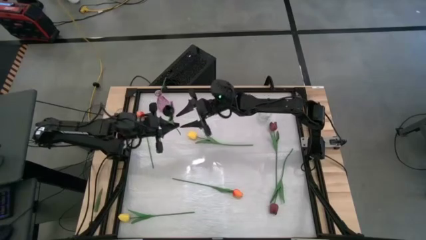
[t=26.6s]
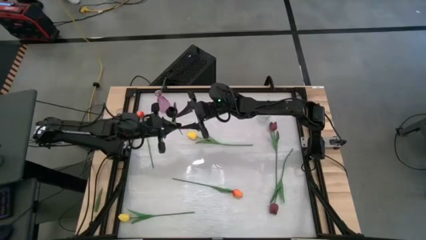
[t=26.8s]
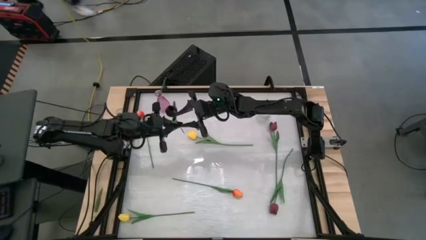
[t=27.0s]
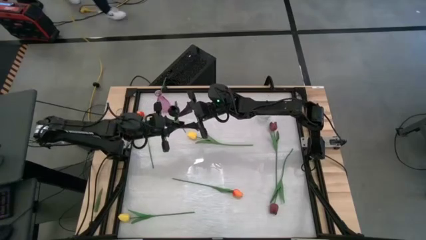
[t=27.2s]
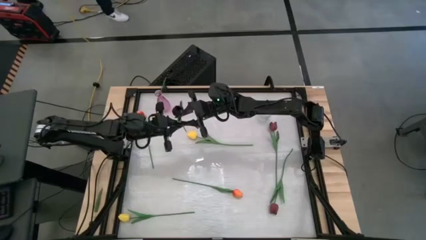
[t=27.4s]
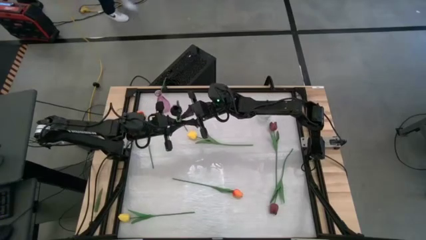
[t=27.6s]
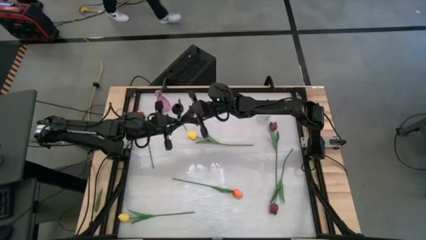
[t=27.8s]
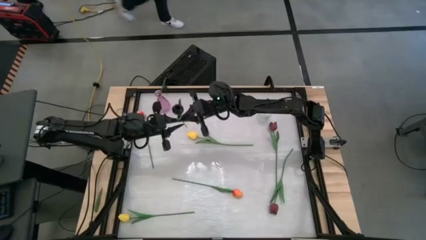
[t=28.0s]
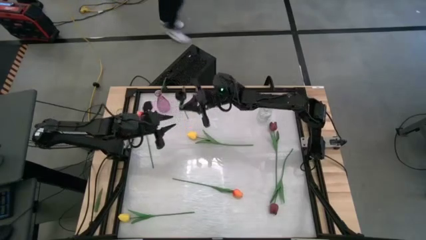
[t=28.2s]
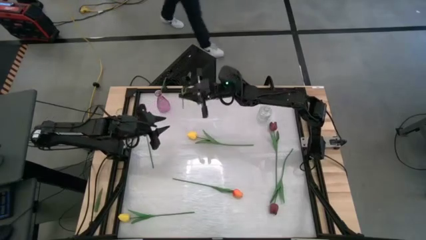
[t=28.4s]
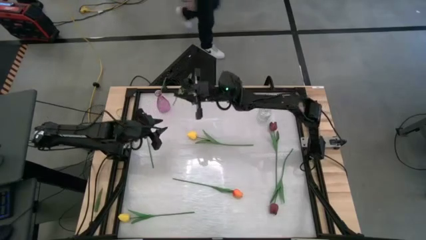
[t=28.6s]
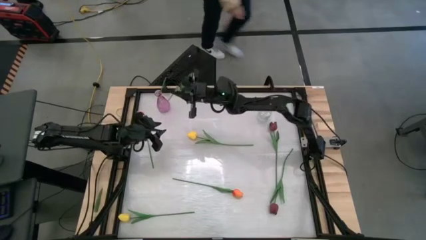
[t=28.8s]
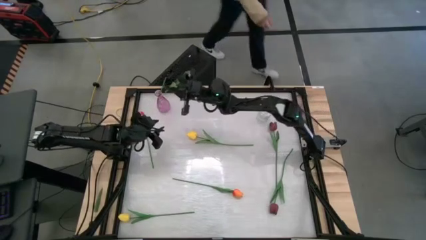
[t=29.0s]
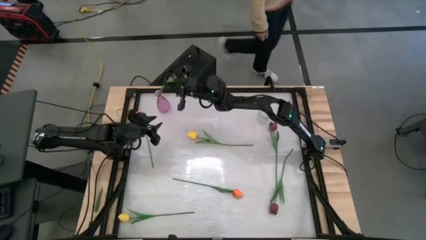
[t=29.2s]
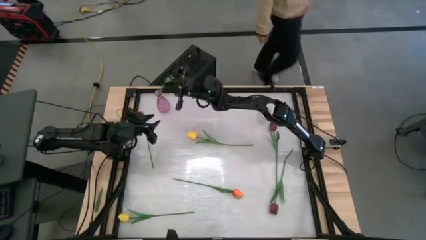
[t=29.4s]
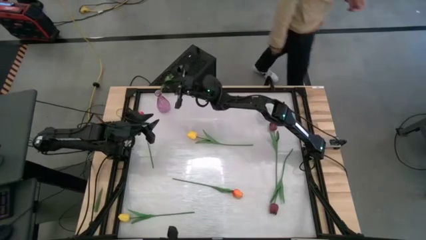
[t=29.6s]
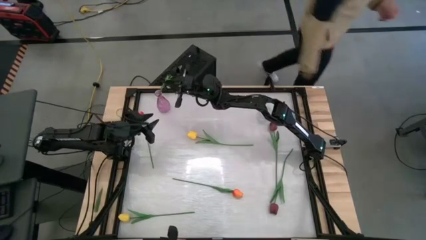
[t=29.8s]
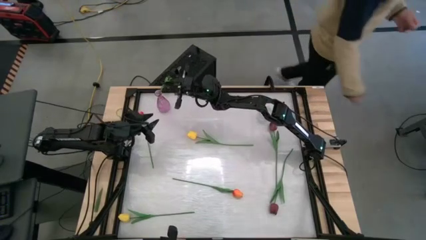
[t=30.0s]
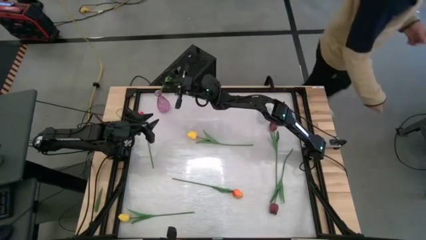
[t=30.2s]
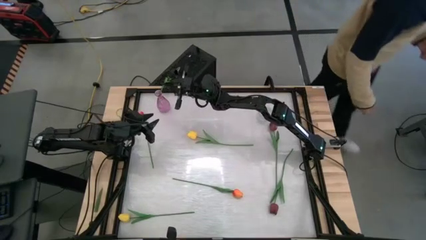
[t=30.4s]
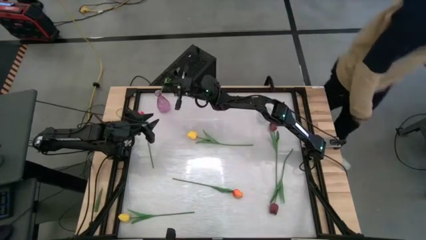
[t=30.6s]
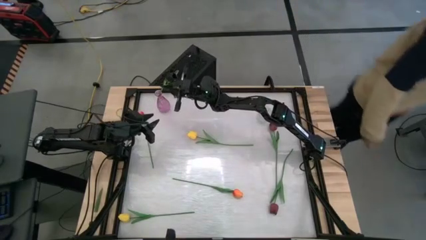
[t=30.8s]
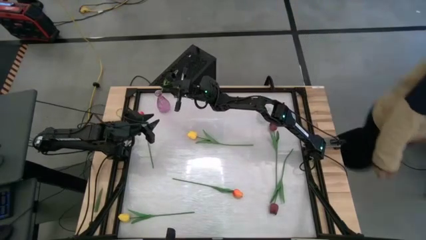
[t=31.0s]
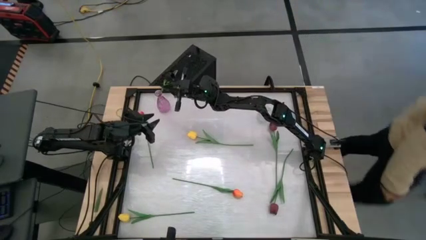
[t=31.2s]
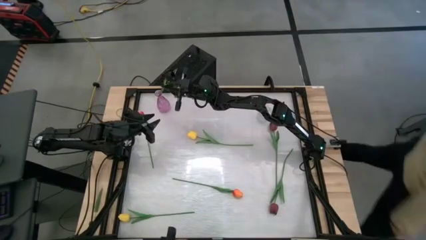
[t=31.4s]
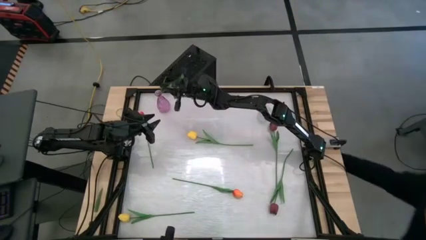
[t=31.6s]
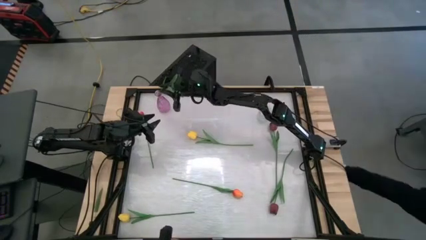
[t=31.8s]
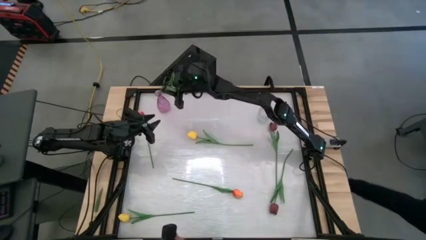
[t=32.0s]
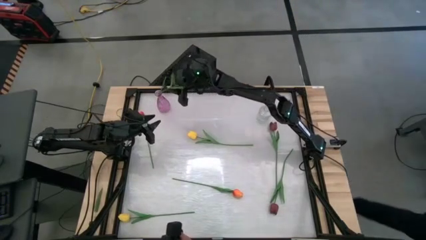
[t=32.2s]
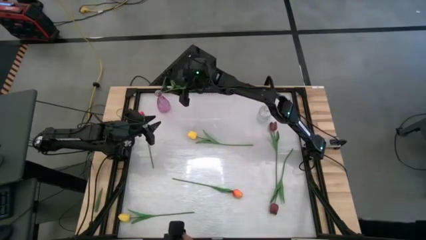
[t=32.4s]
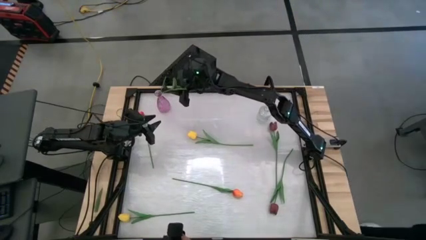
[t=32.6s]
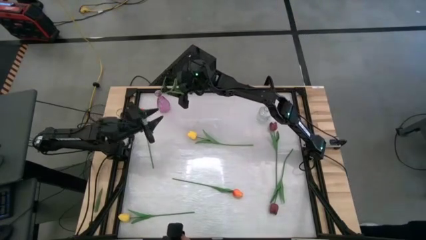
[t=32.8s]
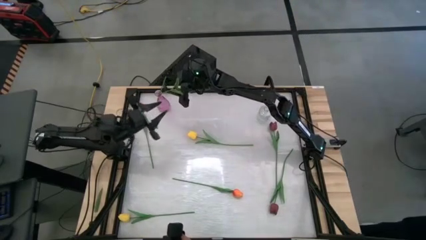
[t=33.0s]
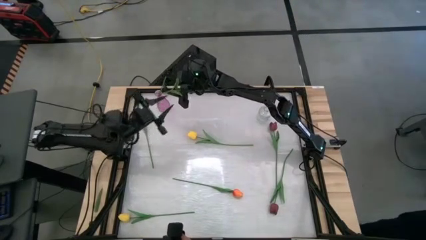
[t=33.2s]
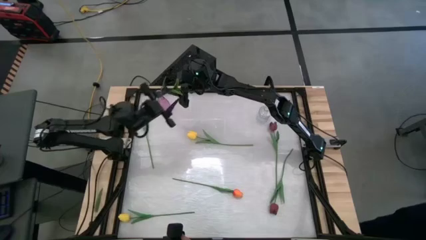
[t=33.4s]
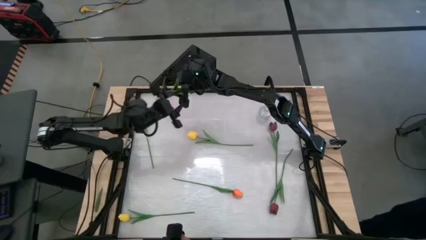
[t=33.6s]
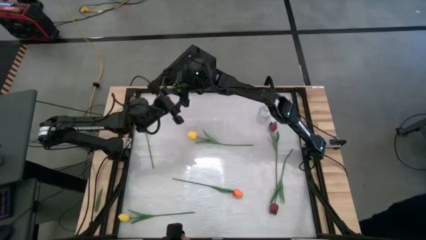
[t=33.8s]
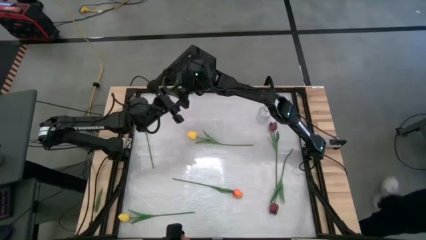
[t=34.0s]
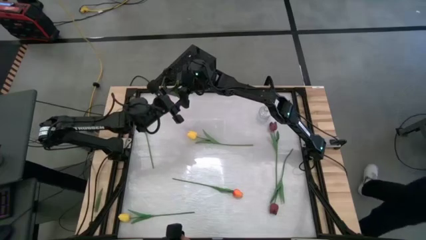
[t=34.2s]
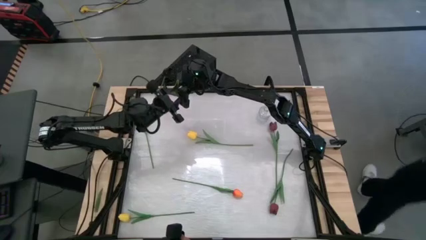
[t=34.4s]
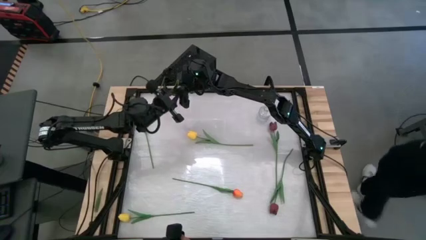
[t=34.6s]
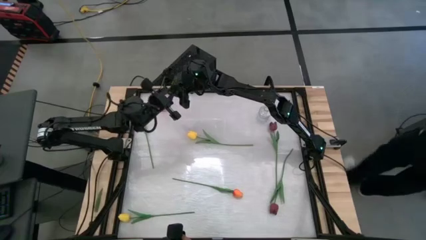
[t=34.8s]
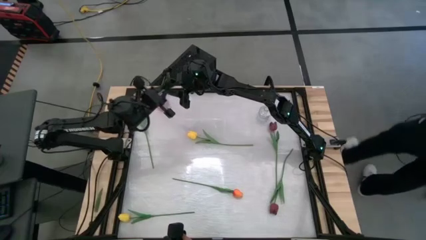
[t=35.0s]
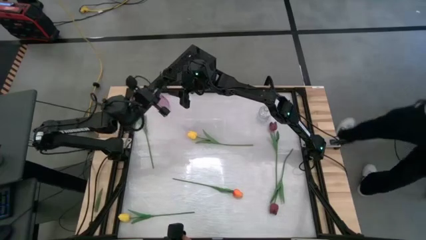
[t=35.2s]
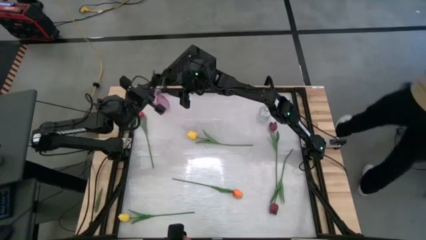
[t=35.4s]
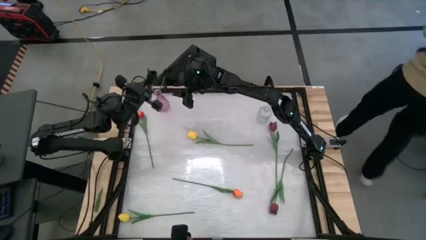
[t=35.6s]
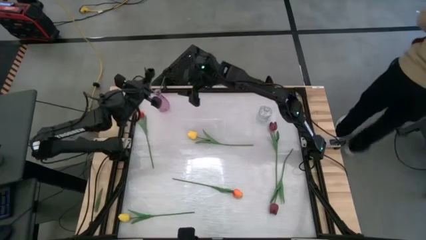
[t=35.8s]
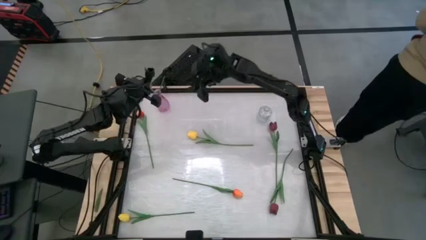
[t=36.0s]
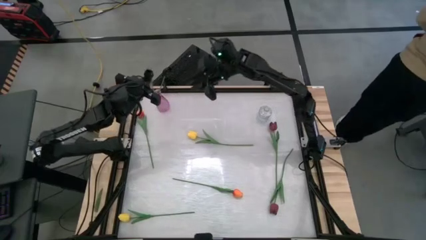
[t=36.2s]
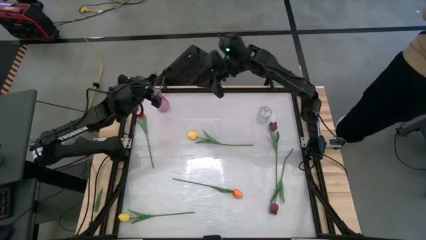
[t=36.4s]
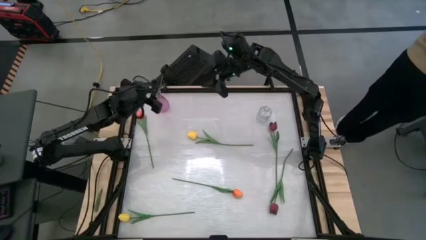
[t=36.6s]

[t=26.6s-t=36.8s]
Task: Sort flowers into vase by color
Put the black tulip into the violet vase
